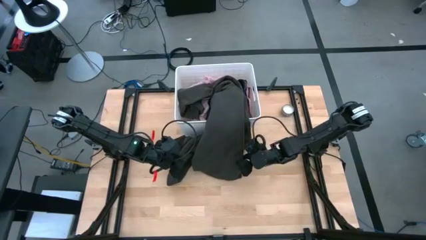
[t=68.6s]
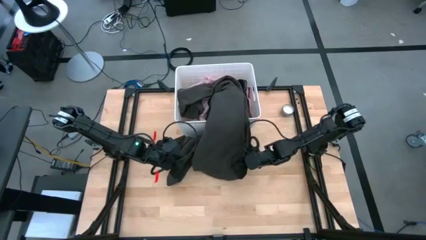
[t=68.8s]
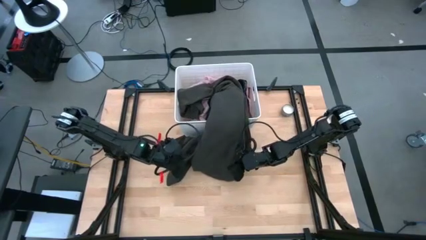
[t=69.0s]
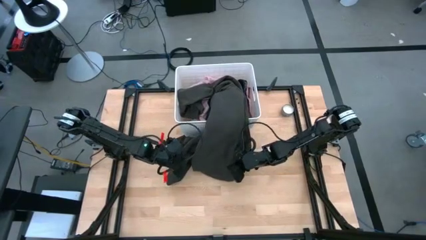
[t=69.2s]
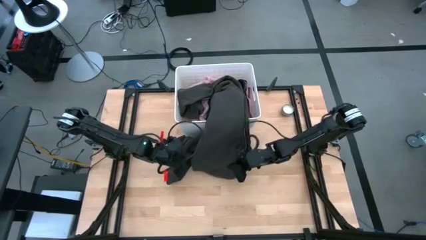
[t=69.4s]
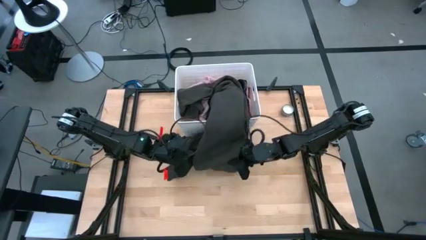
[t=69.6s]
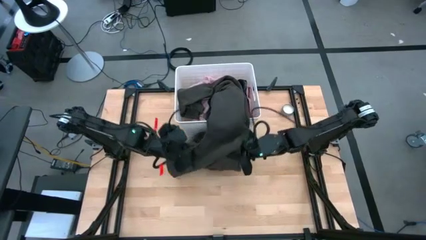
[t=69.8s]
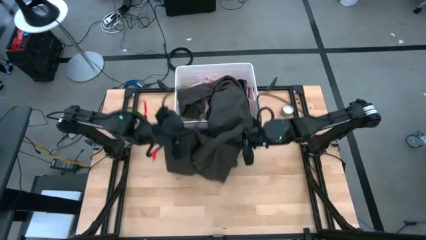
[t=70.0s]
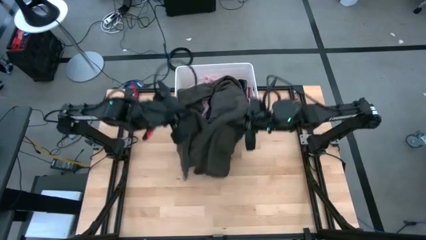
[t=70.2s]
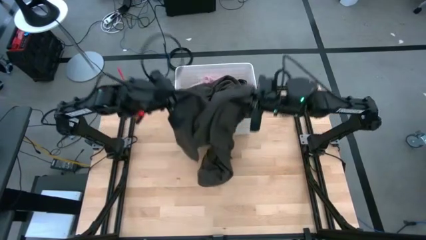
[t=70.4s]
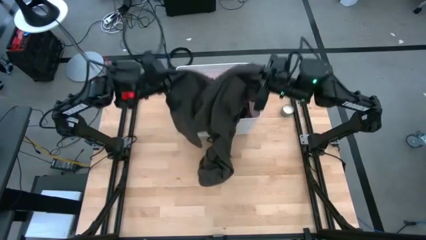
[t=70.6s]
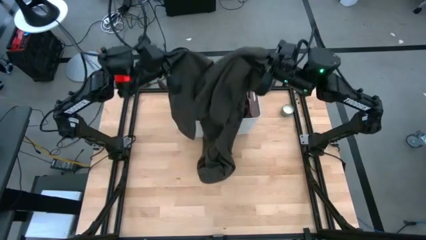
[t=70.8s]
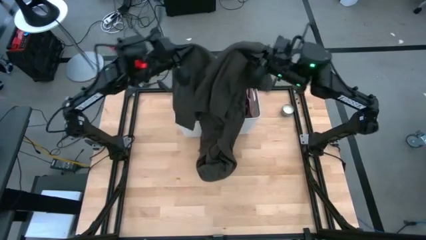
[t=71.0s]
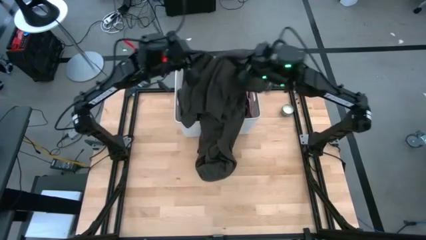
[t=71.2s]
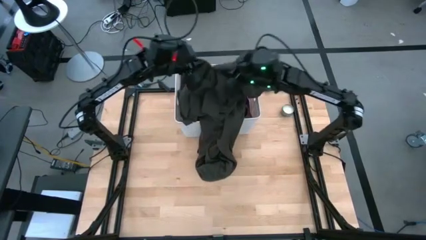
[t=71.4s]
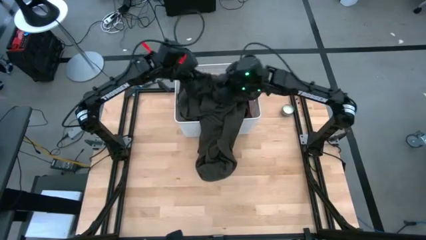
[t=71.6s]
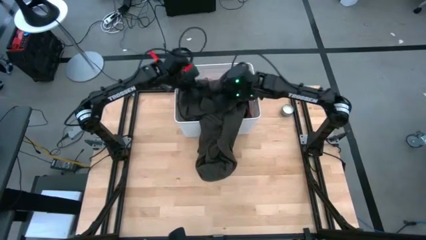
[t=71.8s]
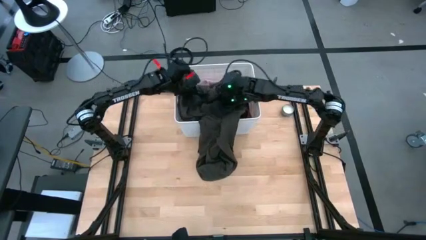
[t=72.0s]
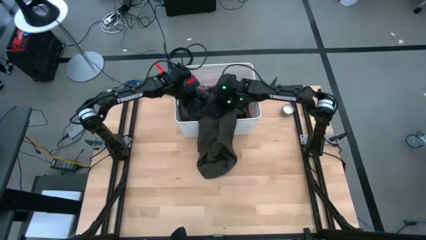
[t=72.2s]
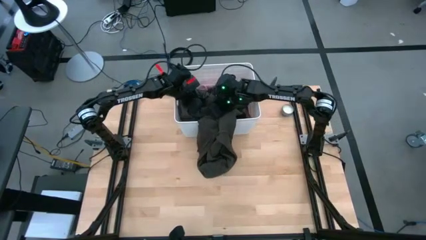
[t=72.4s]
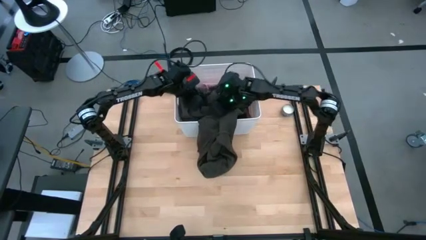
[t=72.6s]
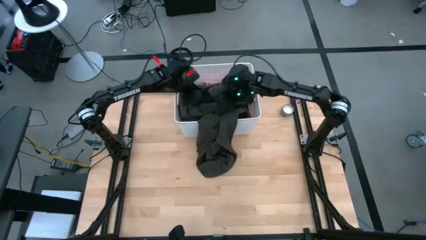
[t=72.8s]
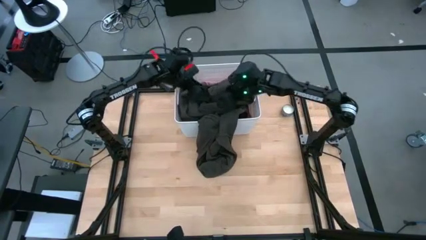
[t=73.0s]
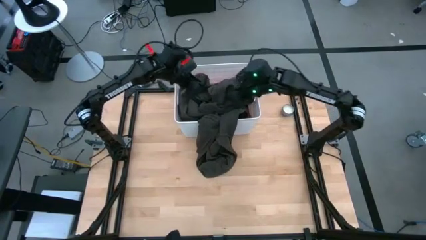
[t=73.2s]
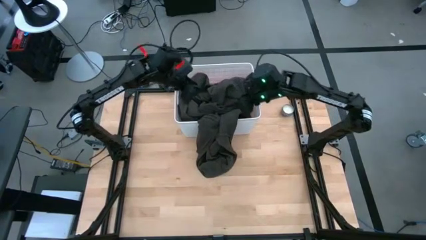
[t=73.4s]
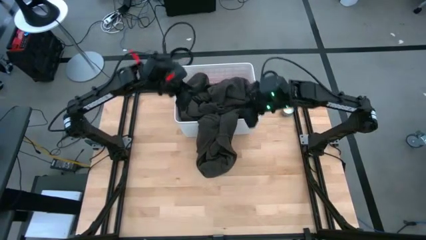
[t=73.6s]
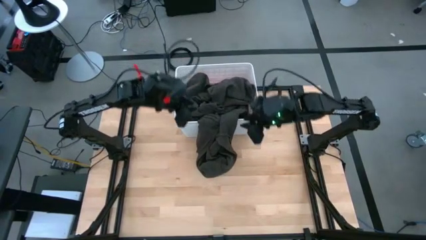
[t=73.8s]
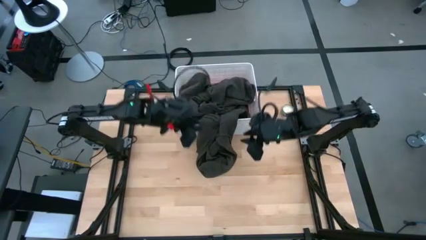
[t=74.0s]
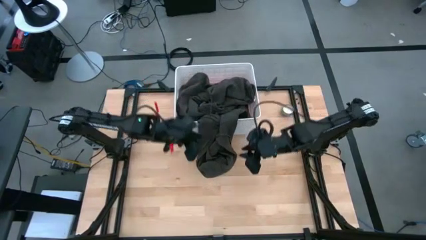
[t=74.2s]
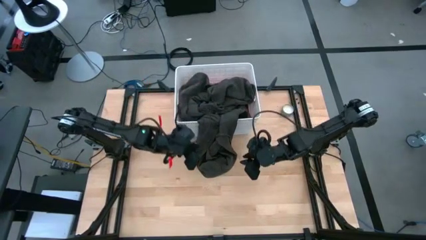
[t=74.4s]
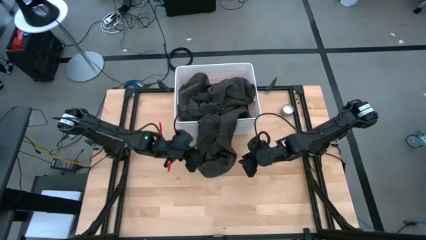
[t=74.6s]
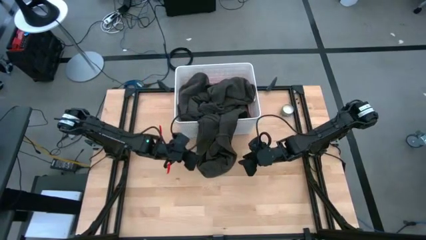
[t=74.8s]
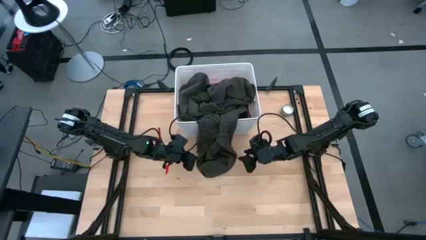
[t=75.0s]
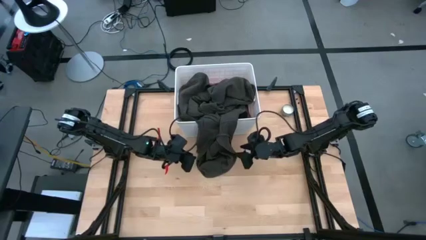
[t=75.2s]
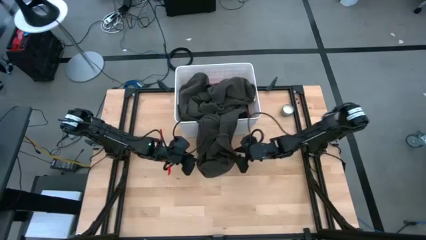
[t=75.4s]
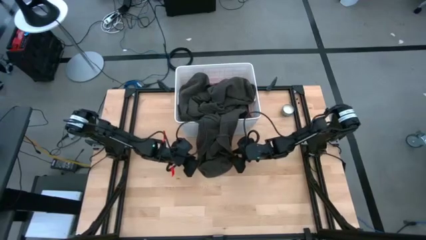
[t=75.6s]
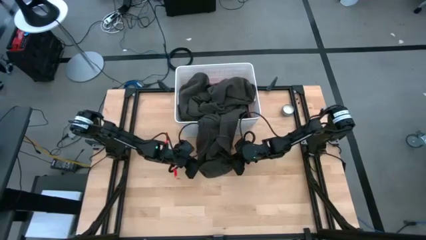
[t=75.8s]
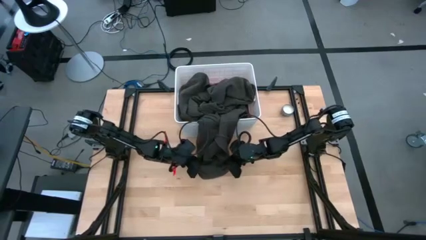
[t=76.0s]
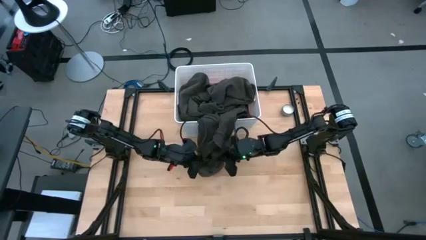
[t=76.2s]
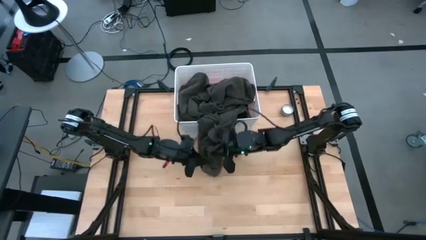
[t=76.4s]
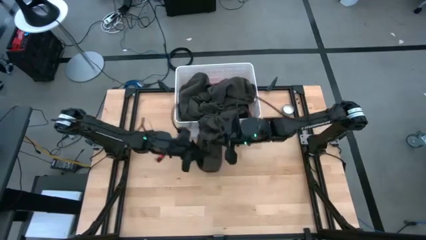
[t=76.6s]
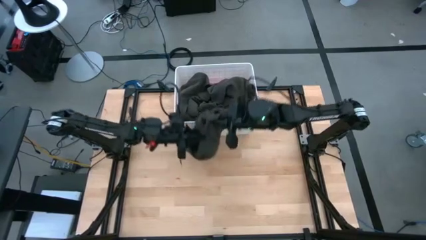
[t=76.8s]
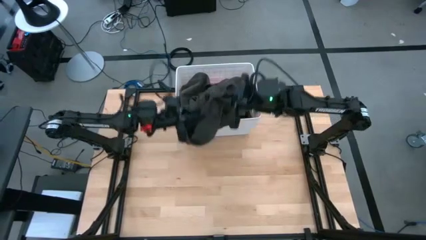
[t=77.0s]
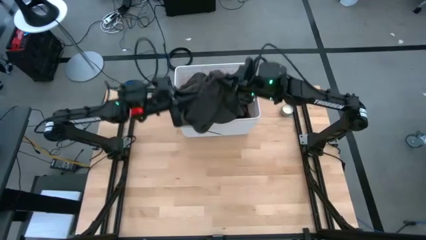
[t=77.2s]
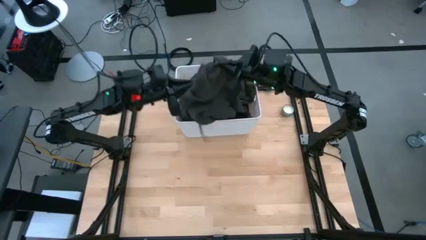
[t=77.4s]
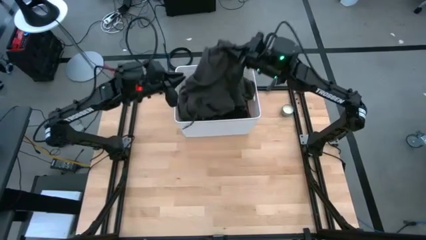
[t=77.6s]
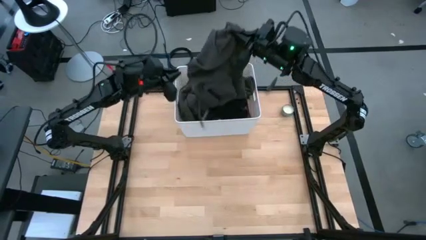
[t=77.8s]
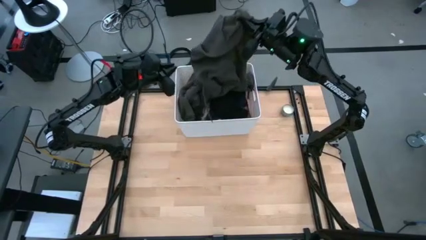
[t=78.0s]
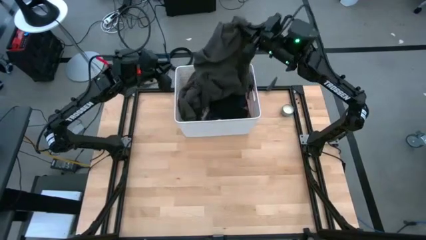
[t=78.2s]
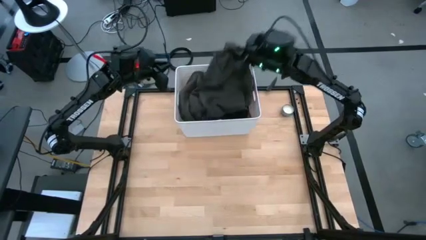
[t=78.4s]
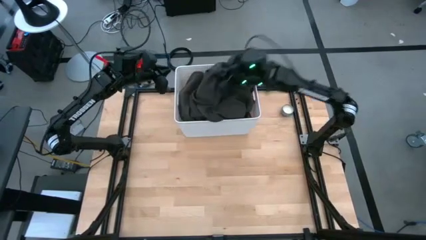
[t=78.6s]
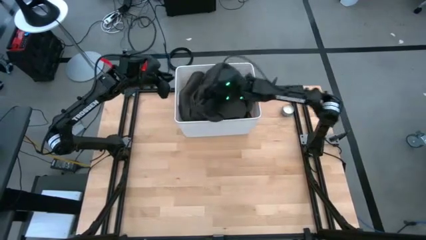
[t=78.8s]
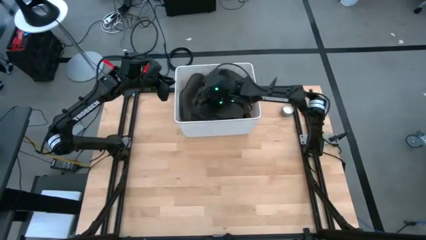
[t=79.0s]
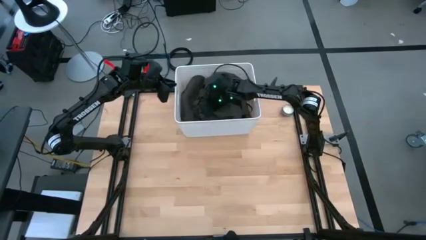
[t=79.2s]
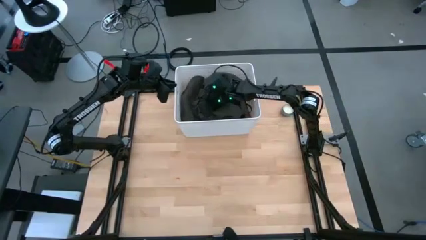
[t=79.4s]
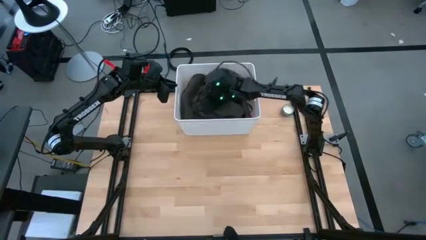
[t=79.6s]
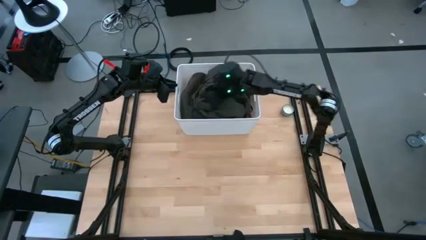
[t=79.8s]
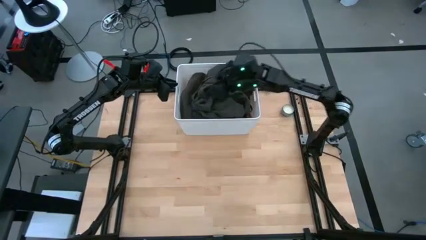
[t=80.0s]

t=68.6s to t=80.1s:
Task: Sort clothes
Put the green hoodie into the white bin

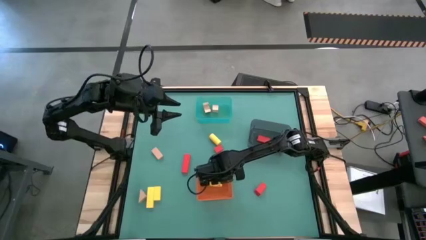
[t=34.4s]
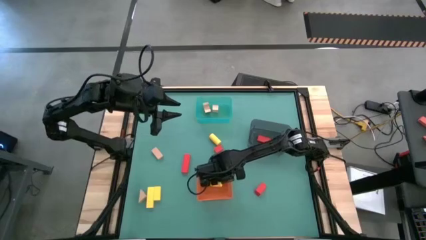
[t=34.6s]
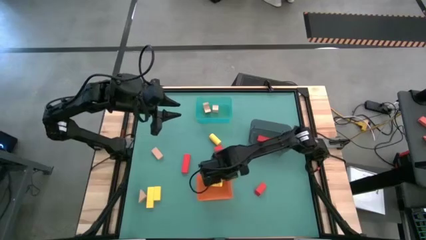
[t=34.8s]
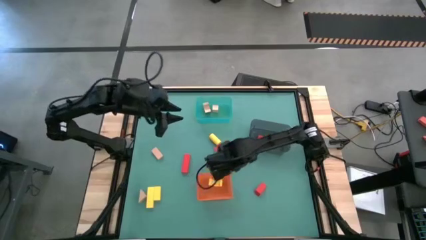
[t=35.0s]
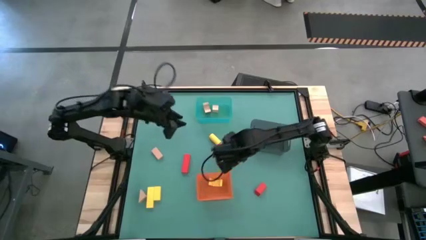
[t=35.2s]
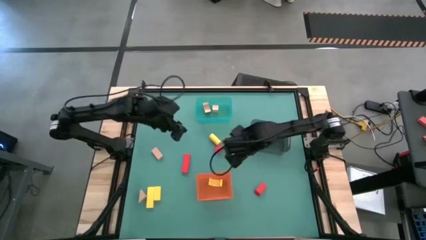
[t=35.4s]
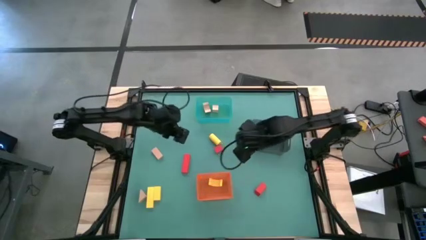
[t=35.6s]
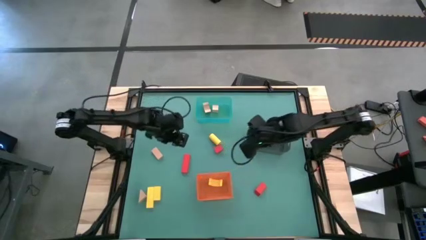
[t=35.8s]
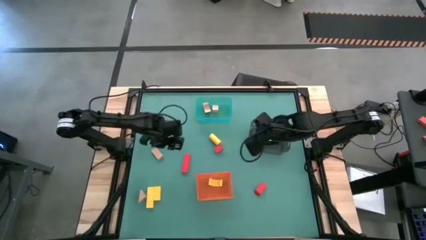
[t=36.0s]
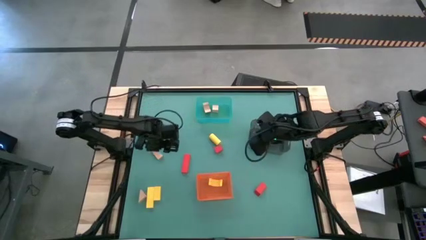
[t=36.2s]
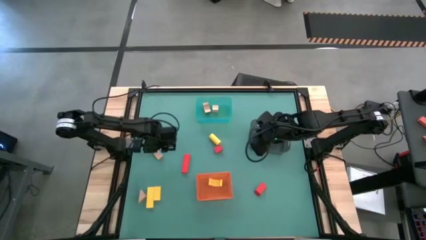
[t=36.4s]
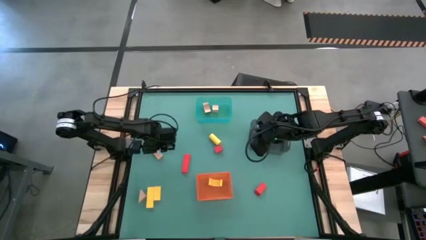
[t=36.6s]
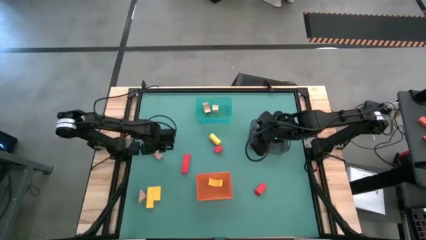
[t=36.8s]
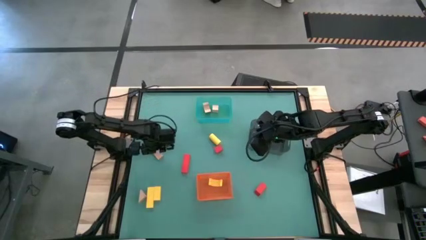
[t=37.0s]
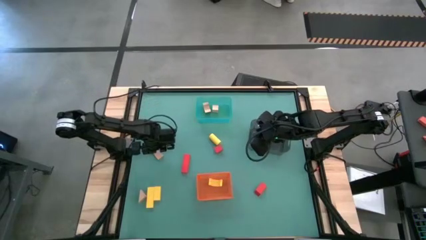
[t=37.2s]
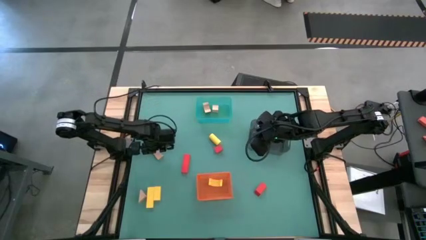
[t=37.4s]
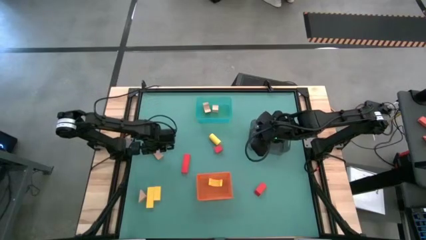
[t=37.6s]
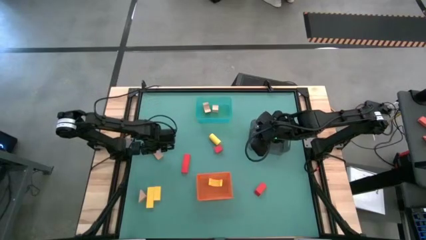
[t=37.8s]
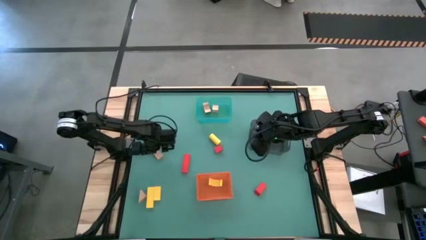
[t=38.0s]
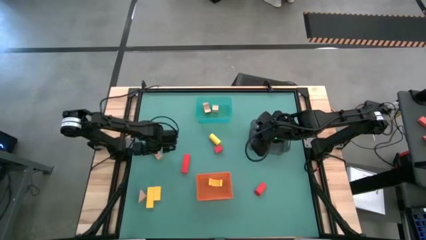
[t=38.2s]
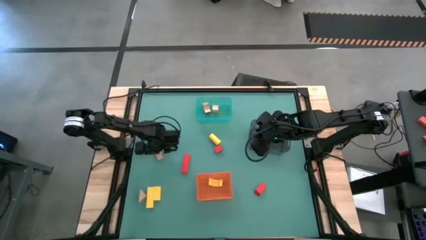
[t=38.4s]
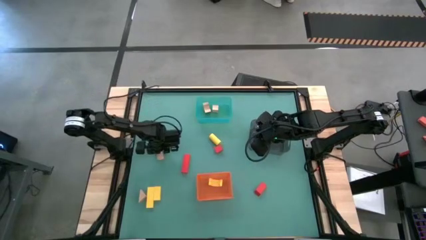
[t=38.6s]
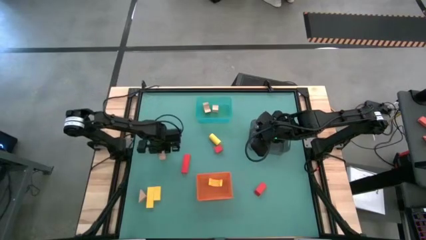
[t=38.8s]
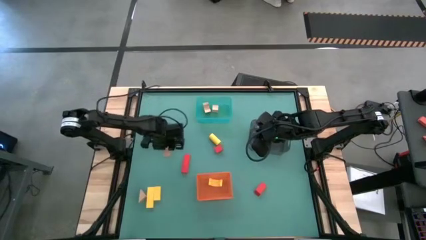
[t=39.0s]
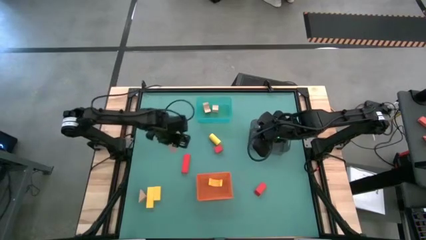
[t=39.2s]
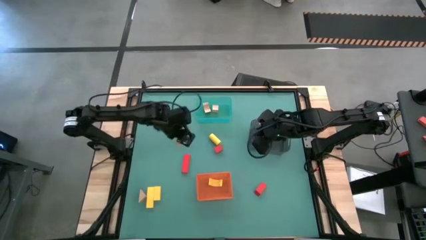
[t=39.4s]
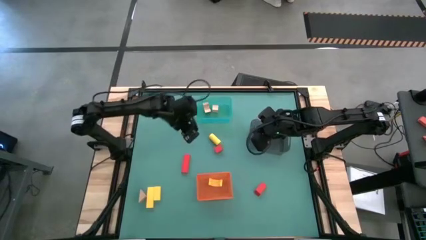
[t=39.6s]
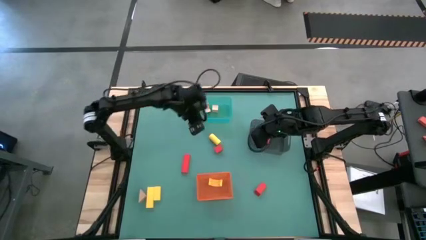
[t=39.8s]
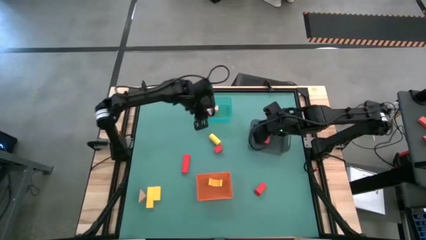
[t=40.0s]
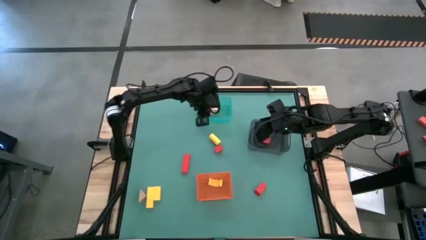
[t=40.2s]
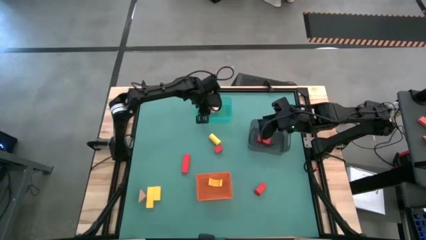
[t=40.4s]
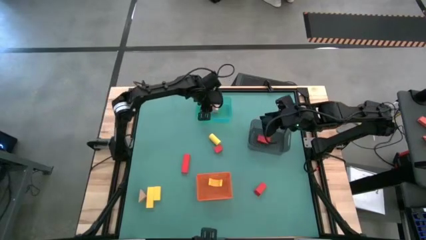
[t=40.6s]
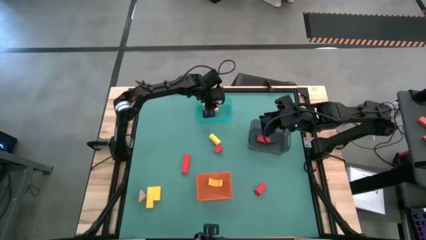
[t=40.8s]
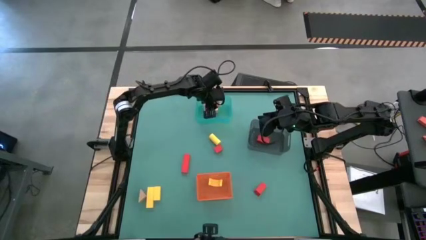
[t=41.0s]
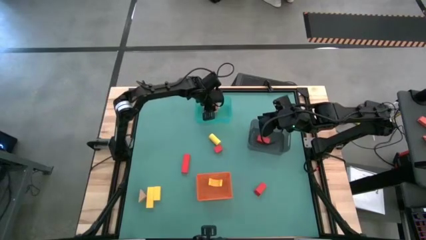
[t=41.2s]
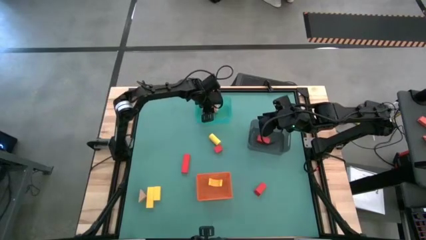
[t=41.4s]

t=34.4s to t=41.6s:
Task: Sort & place blocks by color
Put the brown block into the green bin
